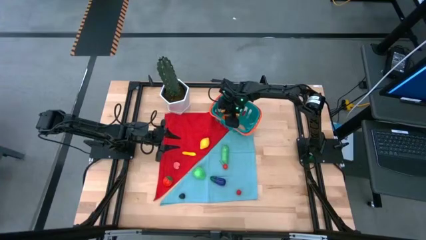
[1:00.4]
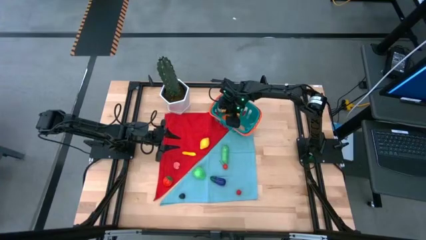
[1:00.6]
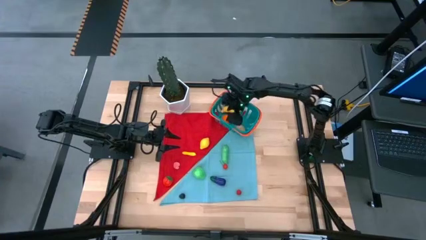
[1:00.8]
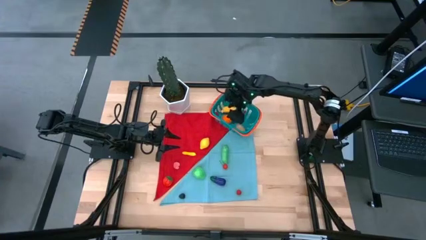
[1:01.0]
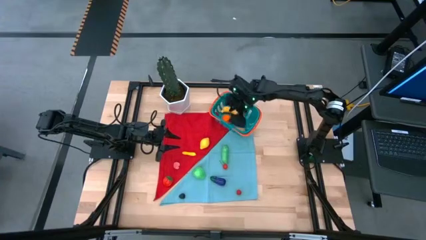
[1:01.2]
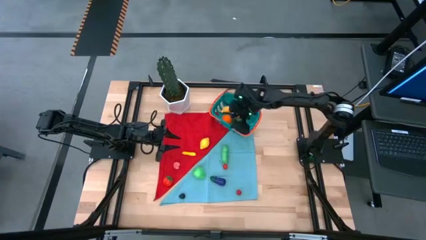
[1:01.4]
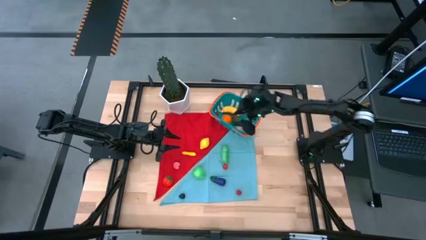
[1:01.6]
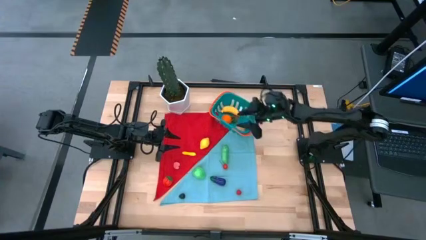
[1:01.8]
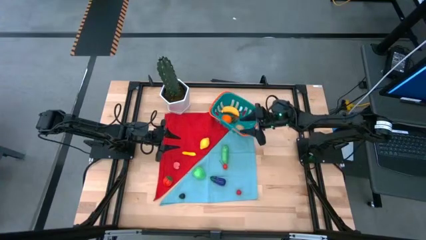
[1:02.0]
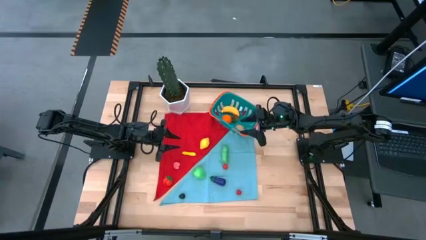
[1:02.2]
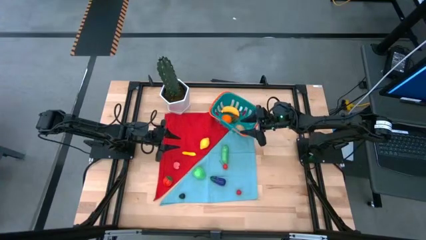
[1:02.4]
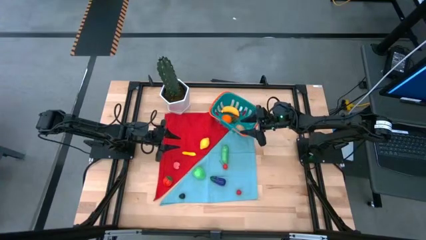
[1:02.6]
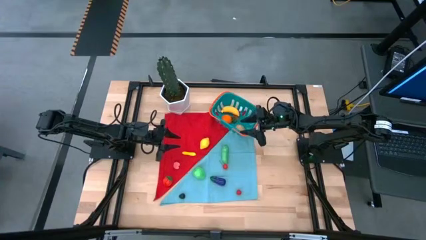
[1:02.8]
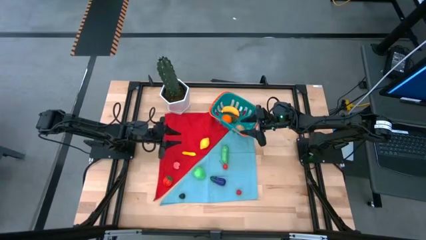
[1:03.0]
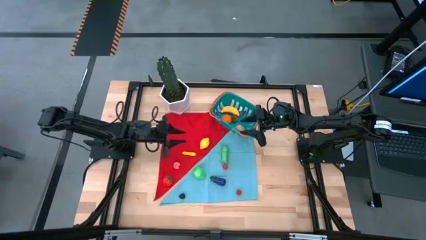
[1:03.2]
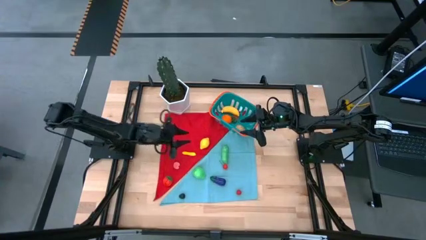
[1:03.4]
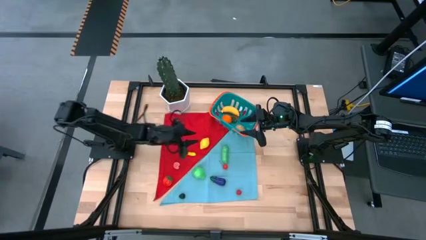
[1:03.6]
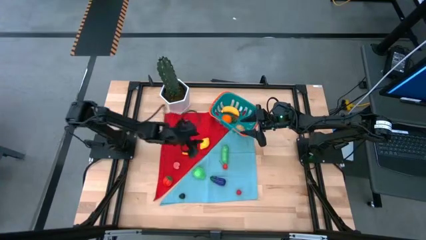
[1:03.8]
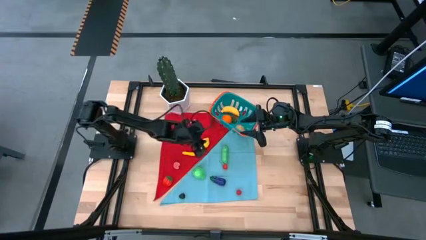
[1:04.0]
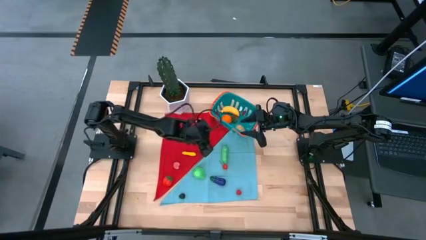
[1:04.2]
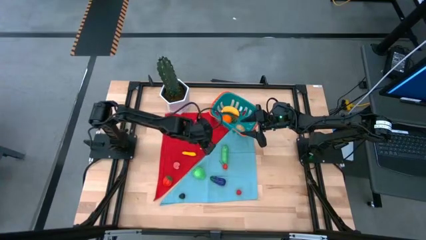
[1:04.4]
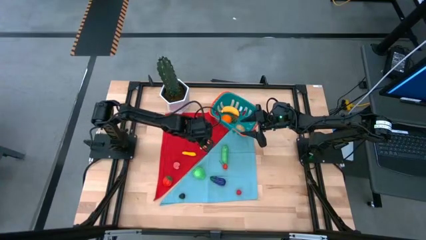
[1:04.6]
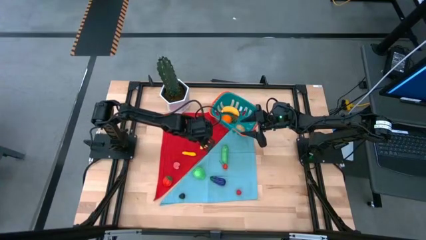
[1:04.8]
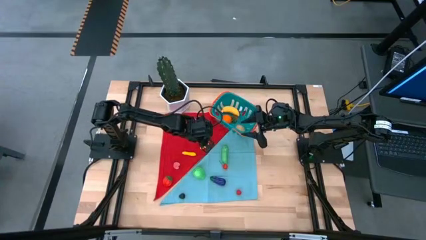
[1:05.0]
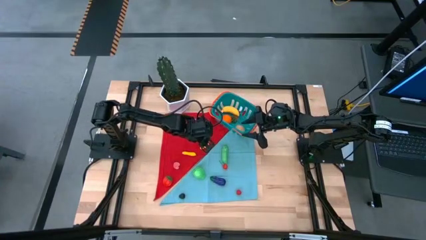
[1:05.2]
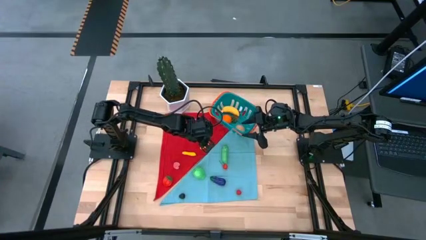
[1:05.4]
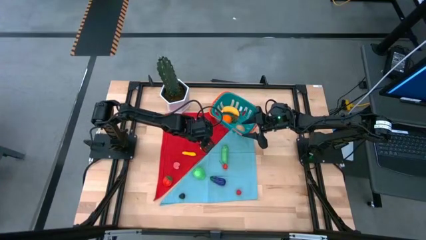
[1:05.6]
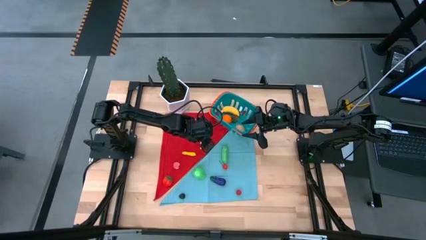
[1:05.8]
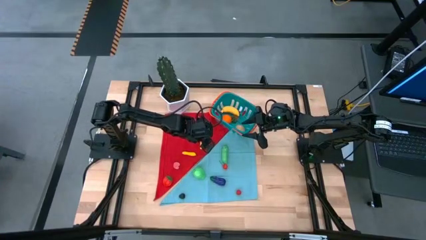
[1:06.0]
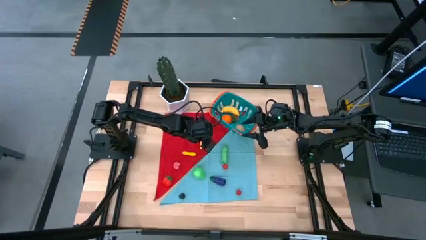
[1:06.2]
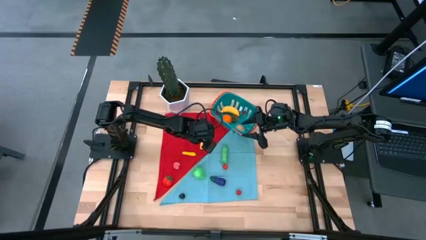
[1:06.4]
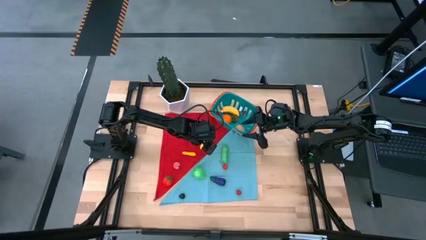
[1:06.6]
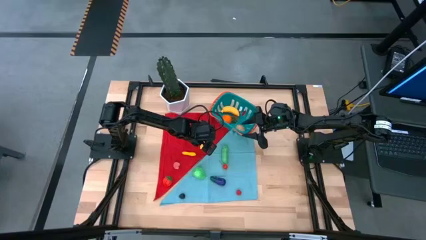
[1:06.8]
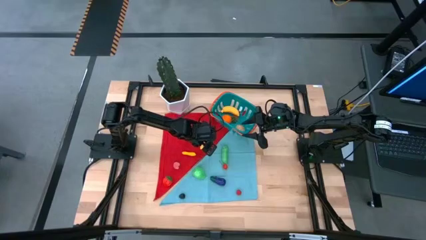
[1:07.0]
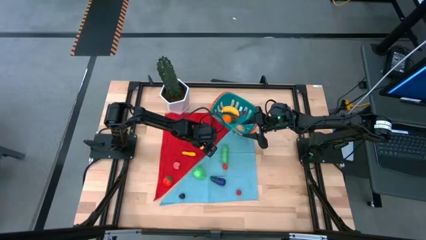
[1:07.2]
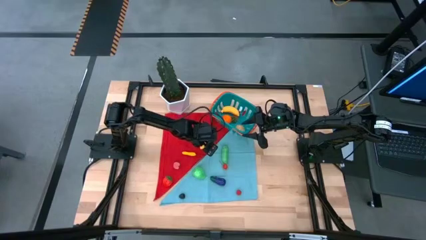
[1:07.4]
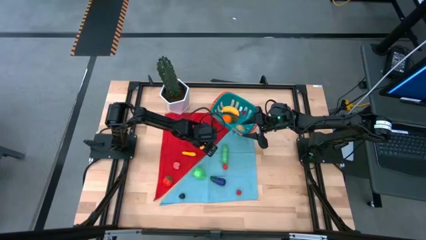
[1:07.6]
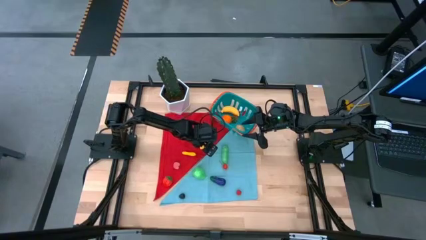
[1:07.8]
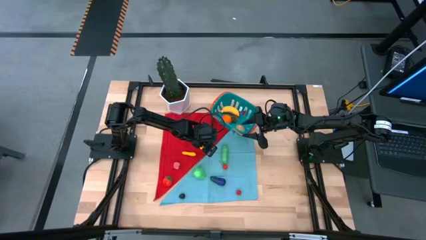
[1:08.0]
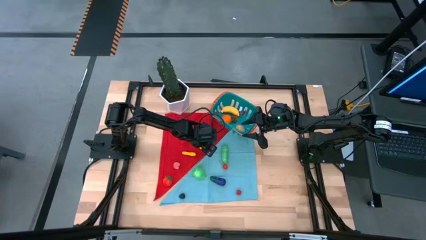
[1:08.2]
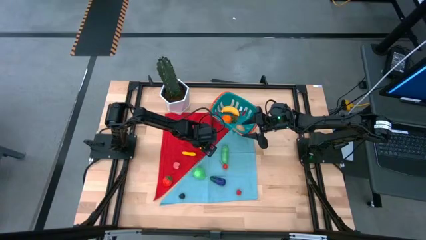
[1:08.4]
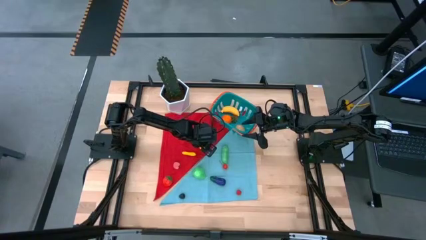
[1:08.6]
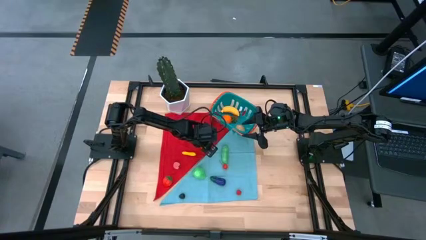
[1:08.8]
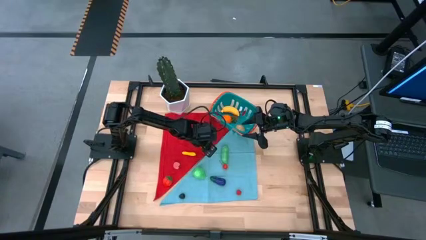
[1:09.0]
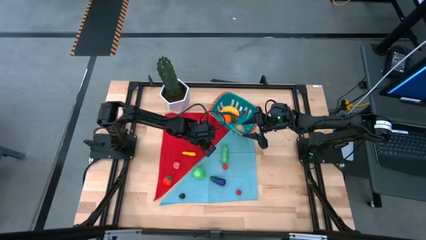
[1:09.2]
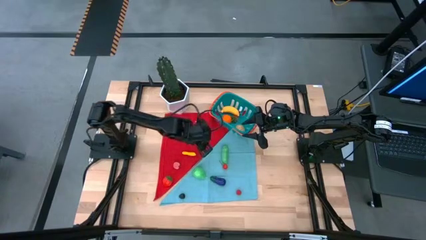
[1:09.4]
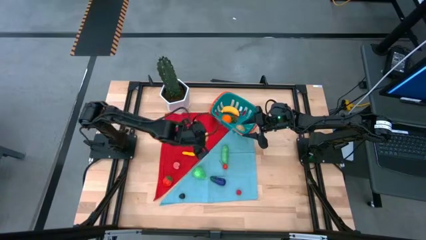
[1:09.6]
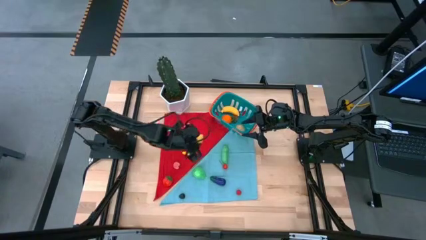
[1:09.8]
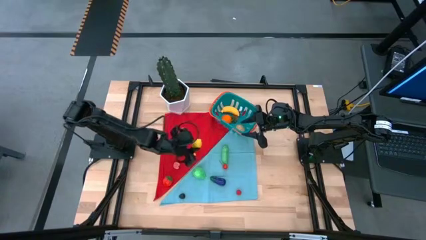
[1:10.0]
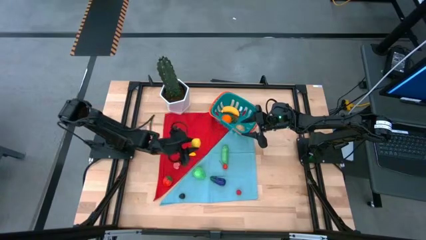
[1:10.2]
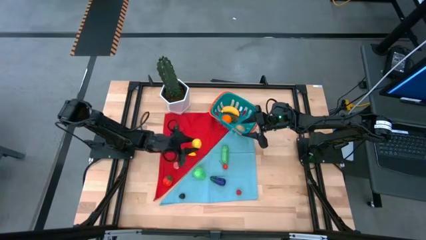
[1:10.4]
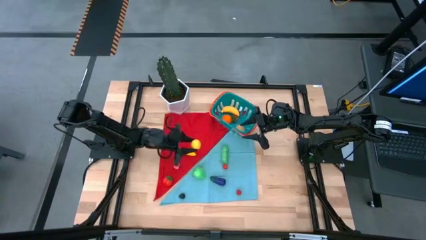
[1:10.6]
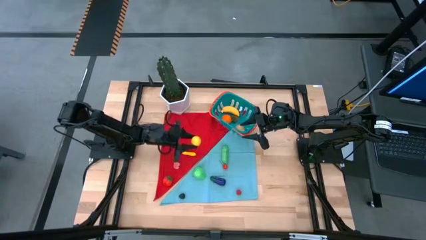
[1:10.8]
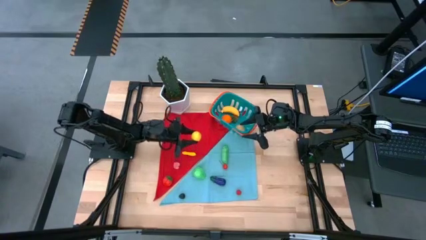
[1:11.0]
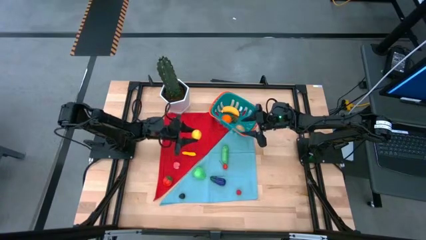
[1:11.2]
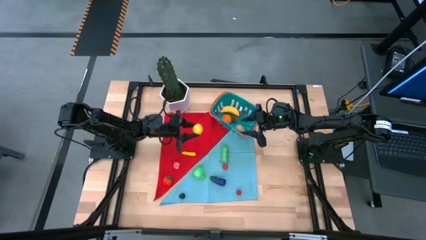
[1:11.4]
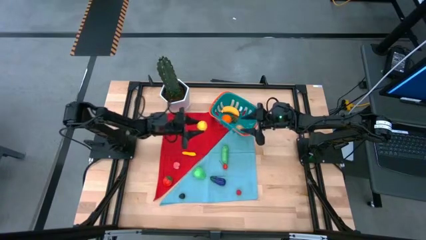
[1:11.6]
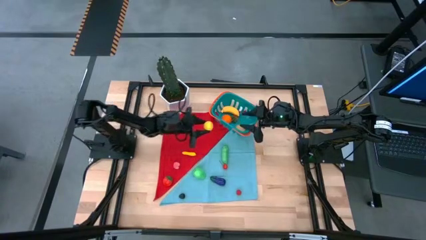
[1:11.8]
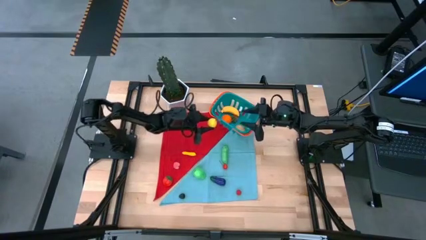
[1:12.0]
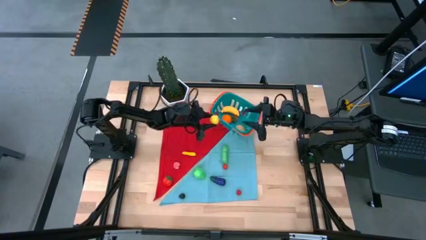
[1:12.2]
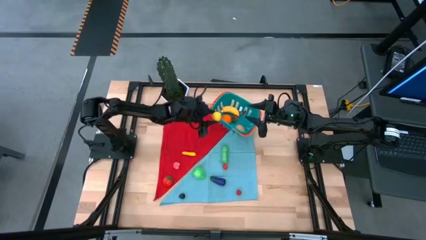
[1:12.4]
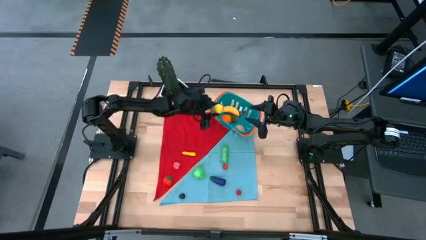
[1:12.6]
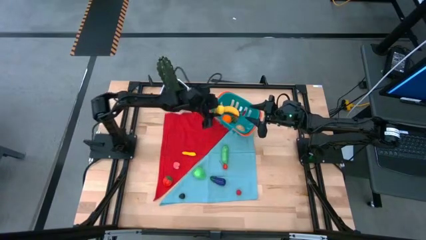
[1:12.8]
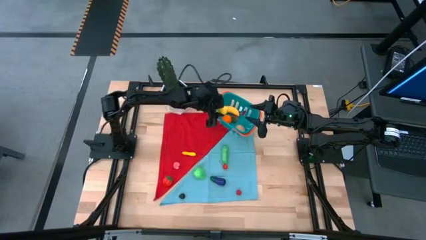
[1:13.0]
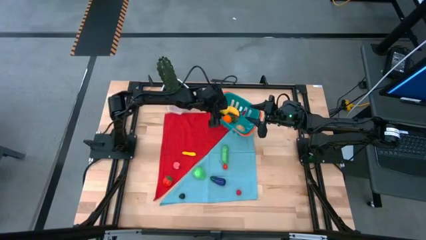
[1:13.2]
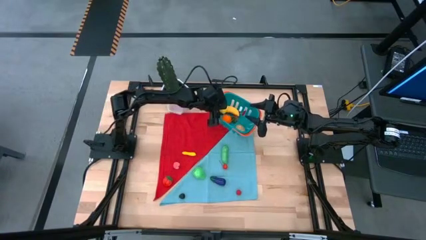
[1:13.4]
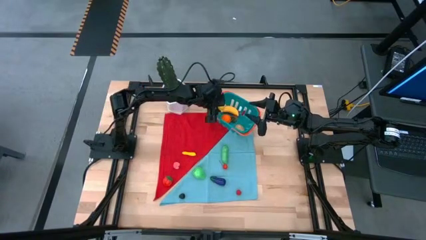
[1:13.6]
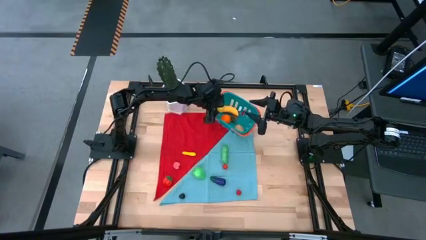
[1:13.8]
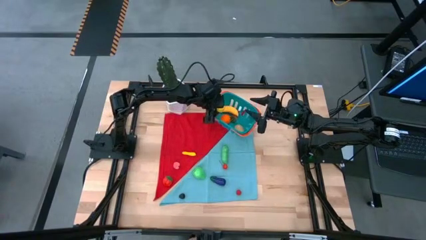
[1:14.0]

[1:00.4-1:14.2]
Task: Pick and placing Produce into tupperware
Put the yellow lemon into the blue basket
